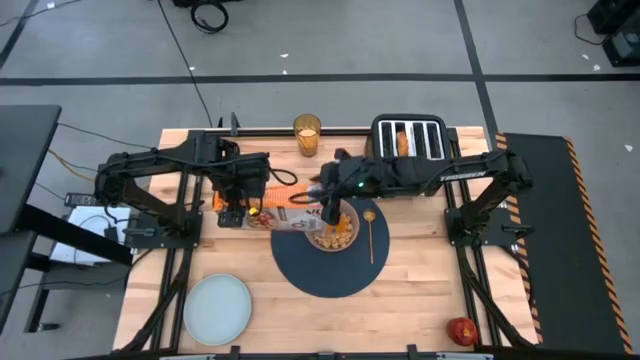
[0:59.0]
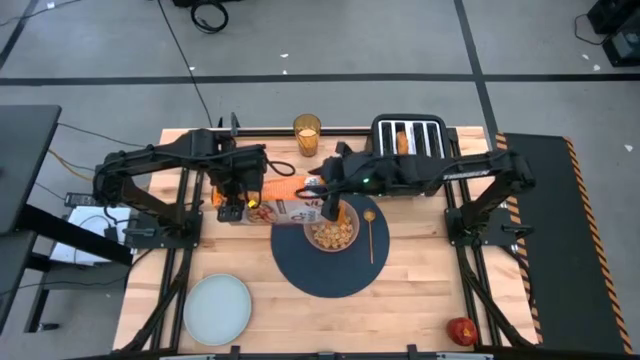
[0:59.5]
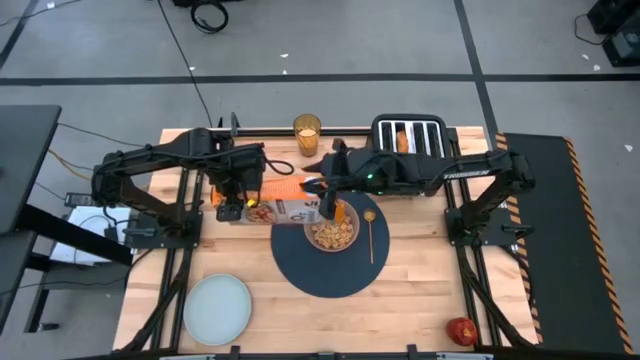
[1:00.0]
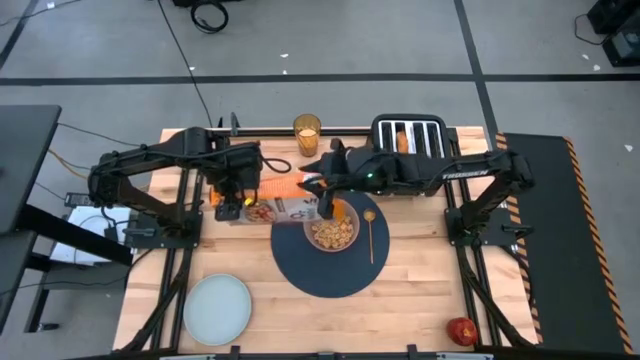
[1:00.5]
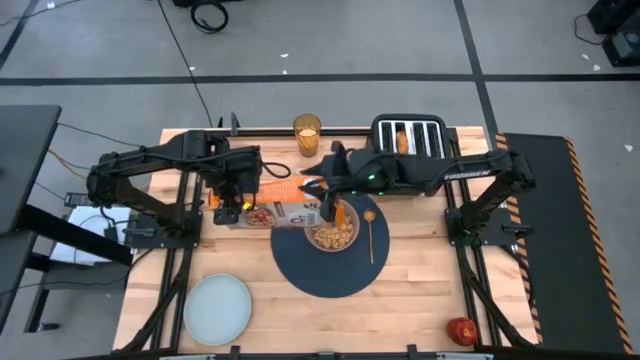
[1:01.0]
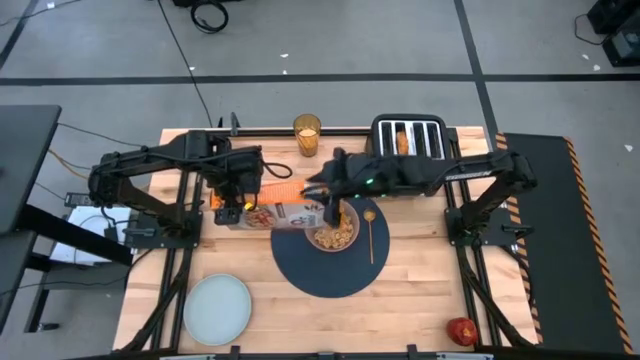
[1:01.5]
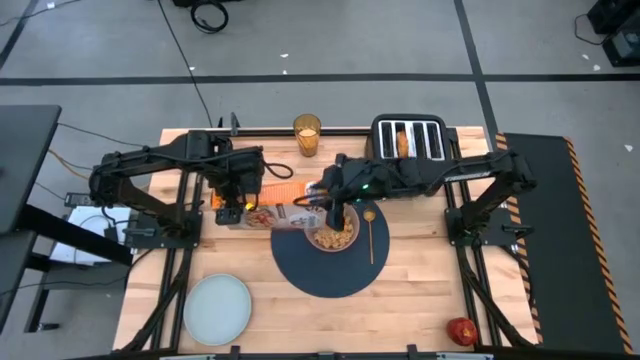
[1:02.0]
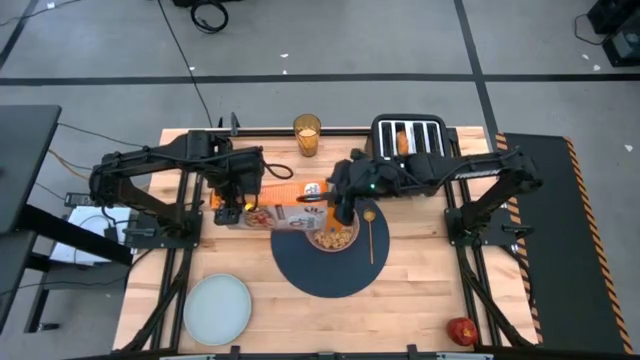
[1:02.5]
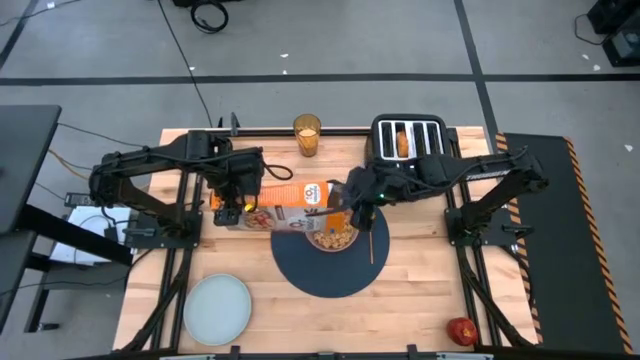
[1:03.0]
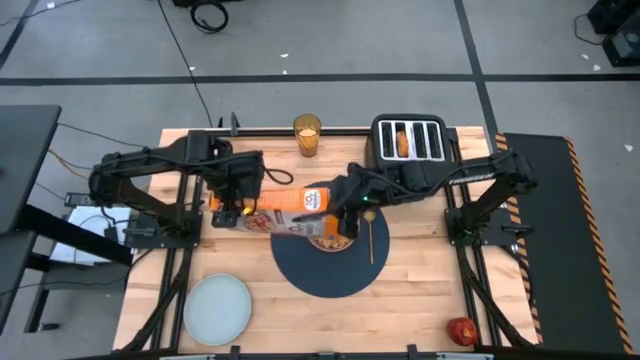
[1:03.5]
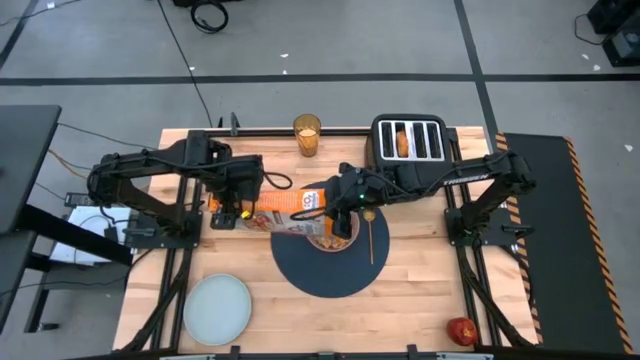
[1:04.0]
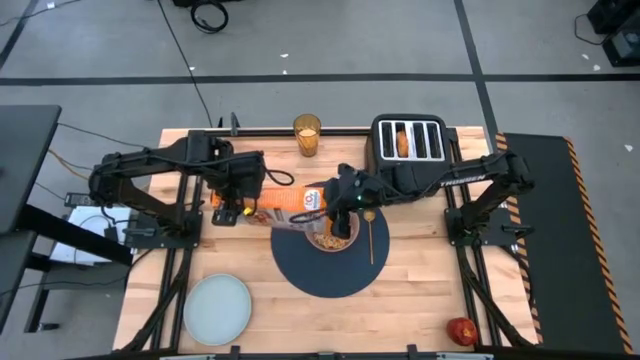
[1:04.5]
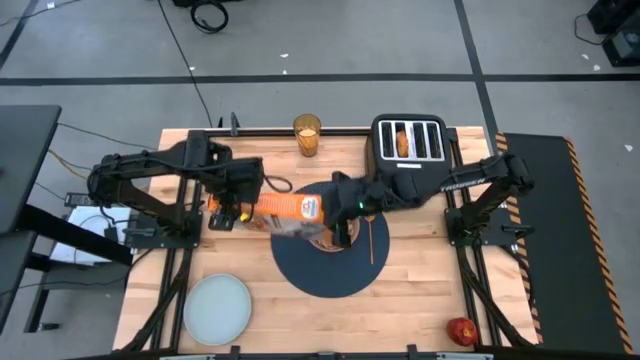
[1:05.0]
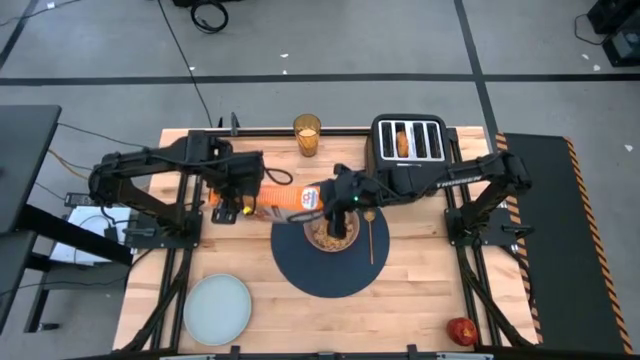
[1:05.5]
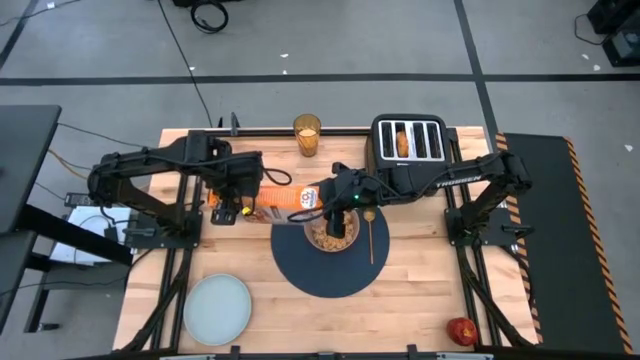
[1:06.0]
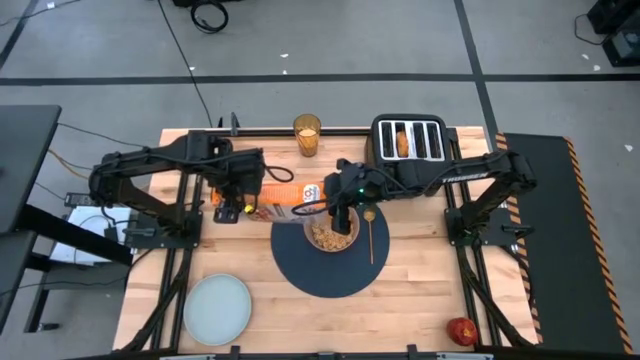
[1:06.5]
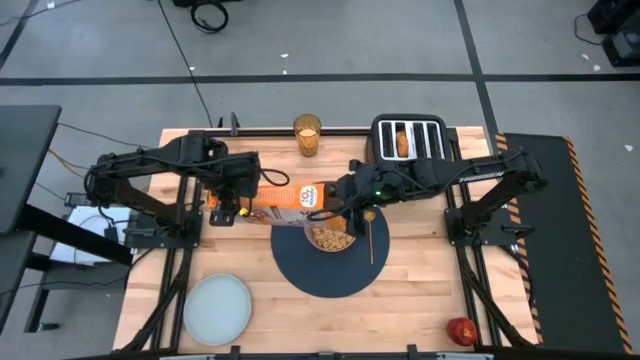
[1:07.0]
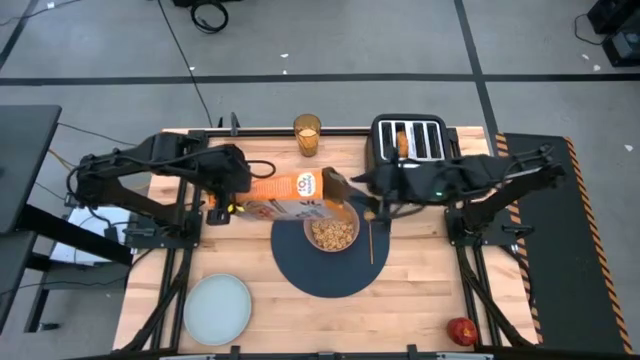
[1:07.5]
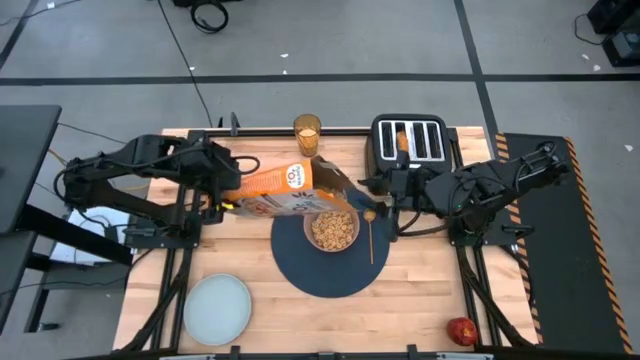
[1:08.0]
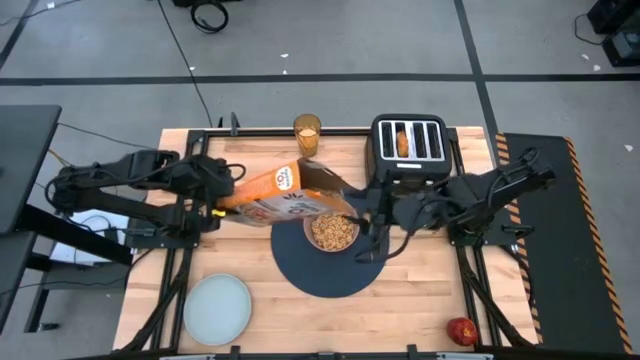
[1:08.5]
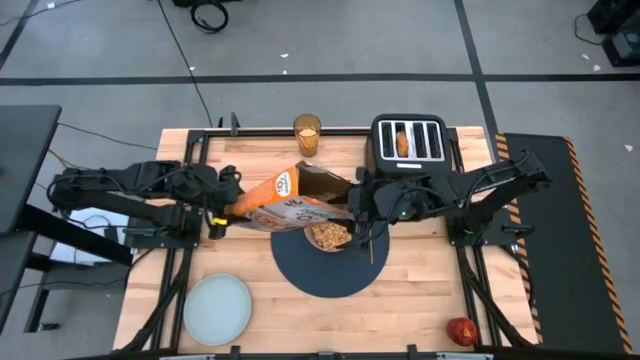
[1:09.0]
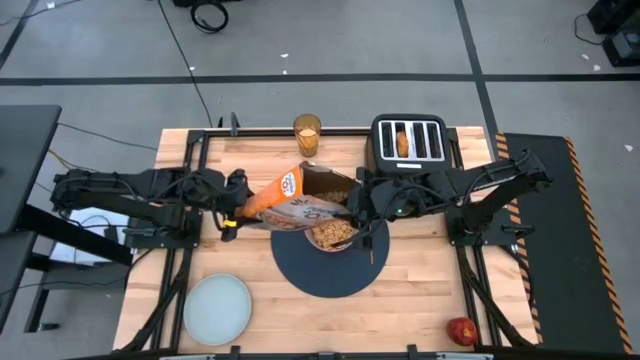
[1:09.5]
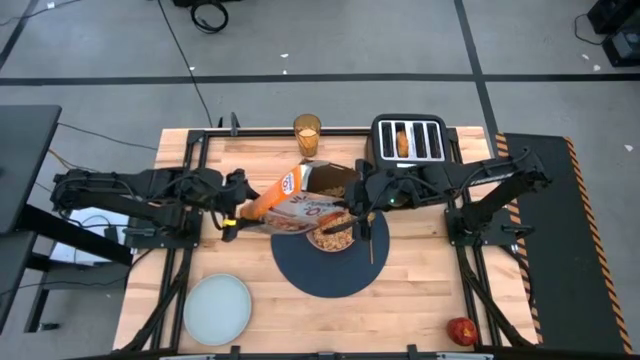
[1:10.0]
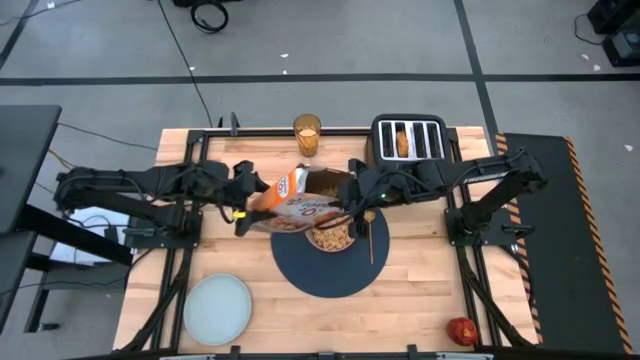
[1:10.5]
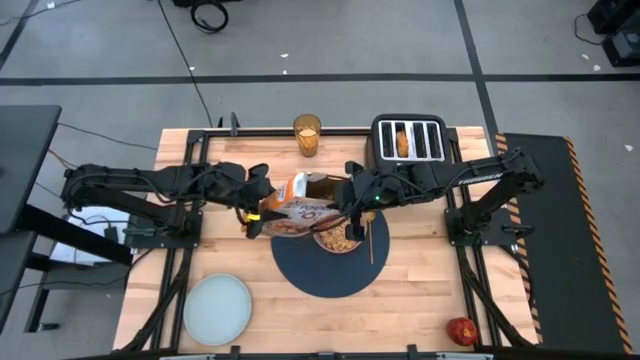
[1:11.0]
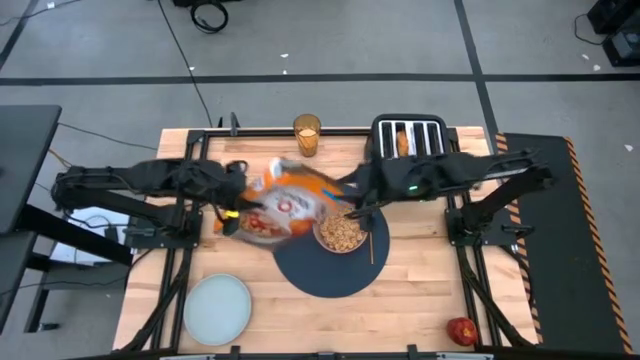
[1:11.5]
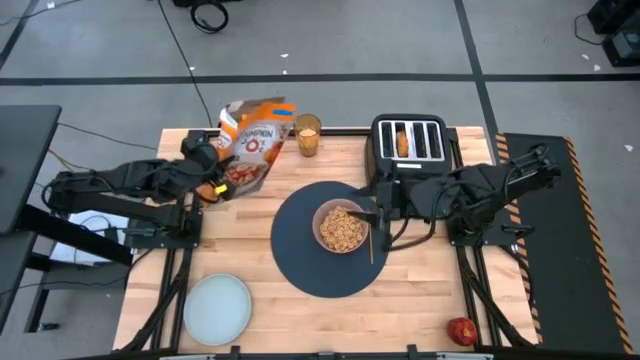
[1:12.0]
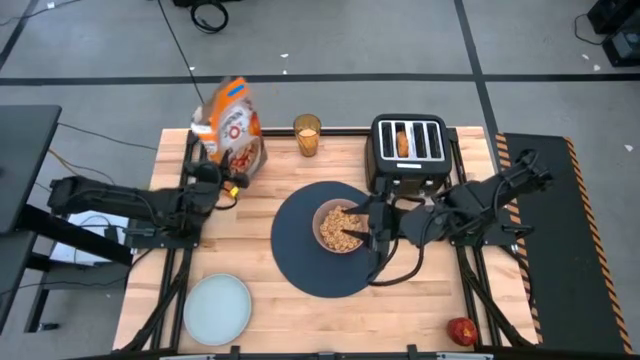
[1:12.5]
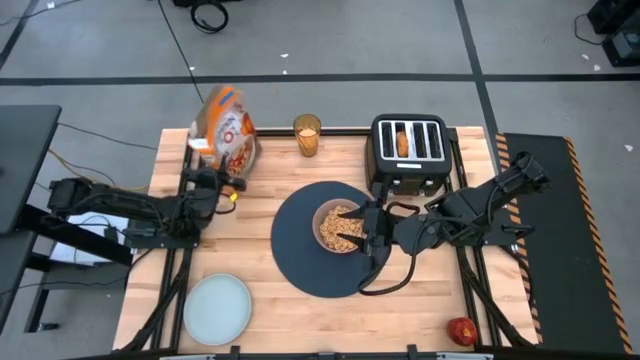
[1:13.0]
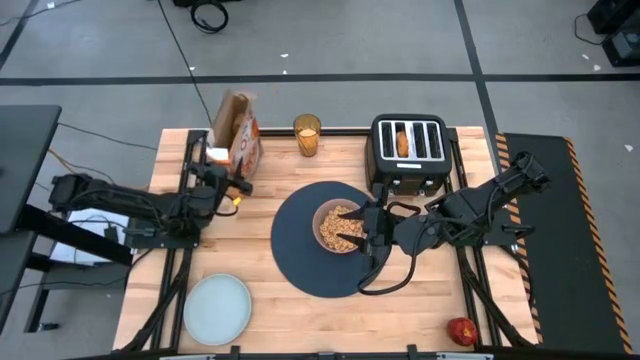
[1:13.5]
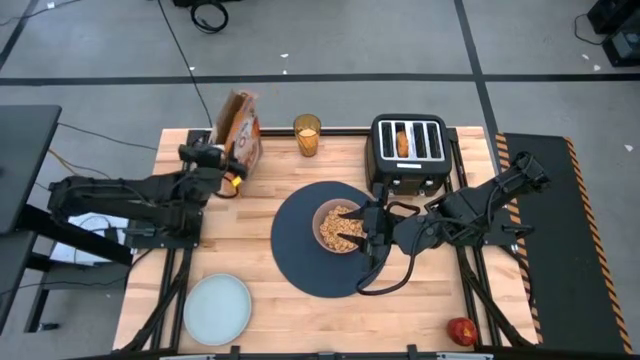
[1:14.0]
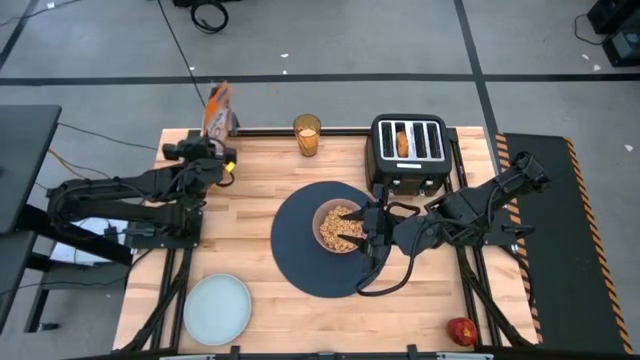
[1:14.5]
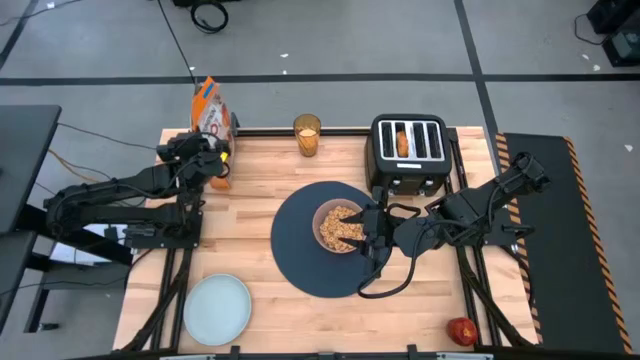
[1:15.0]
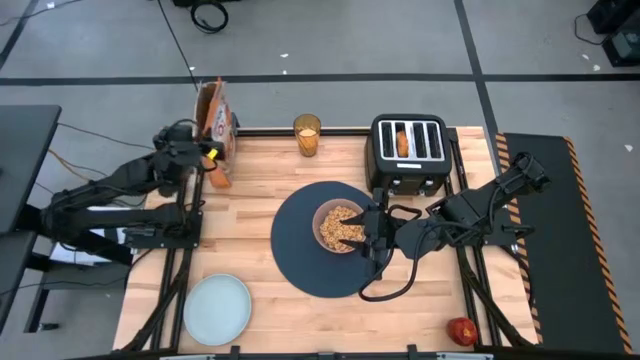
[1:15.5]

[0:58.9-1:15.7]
Task: Arrange a breakfast setting
Pour the cereal from the cereal box into the bowl
